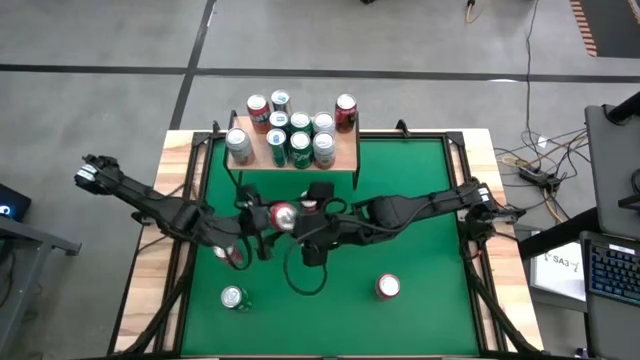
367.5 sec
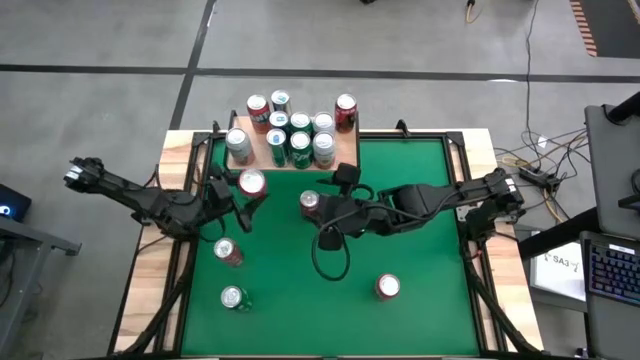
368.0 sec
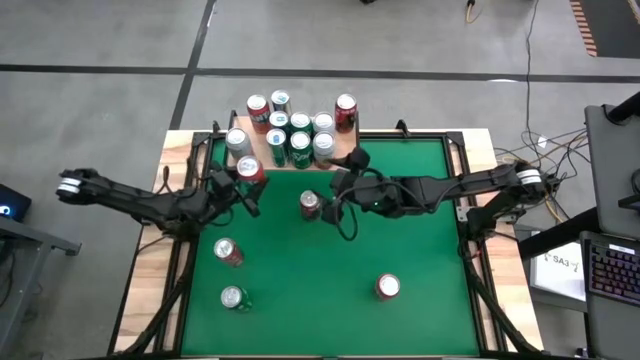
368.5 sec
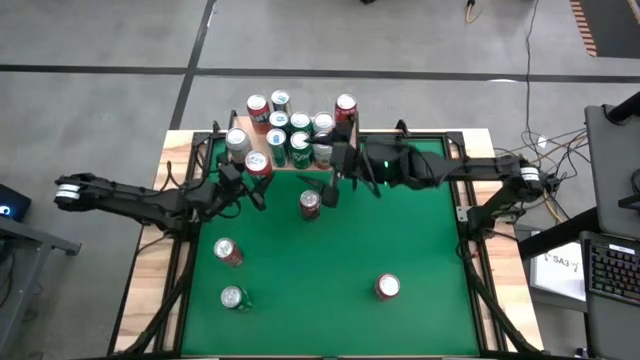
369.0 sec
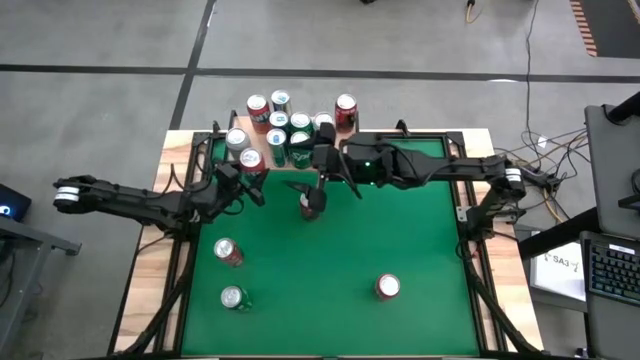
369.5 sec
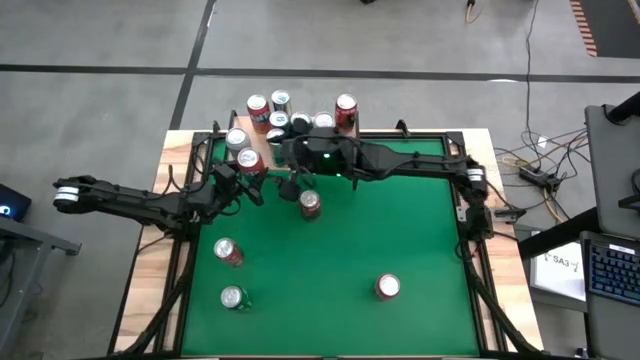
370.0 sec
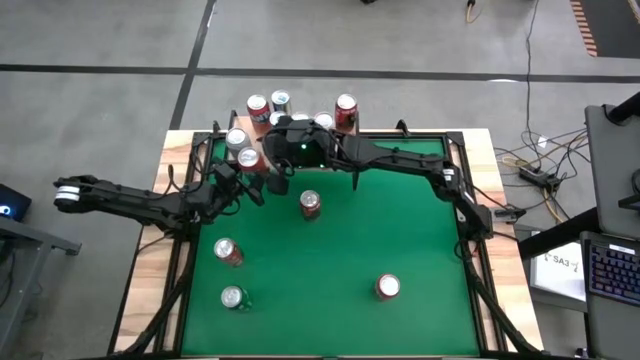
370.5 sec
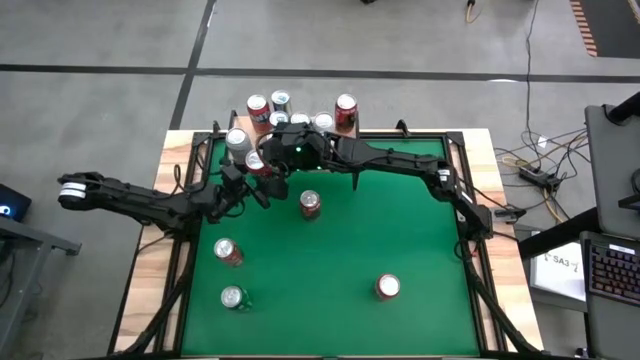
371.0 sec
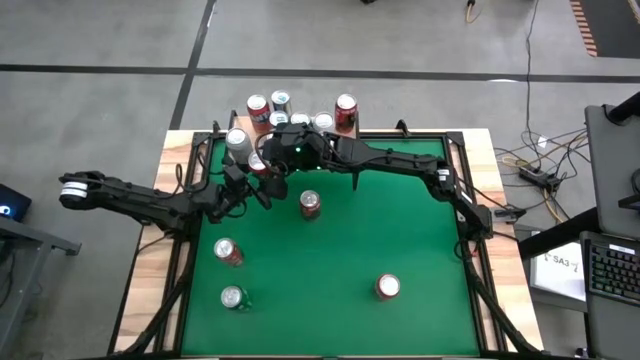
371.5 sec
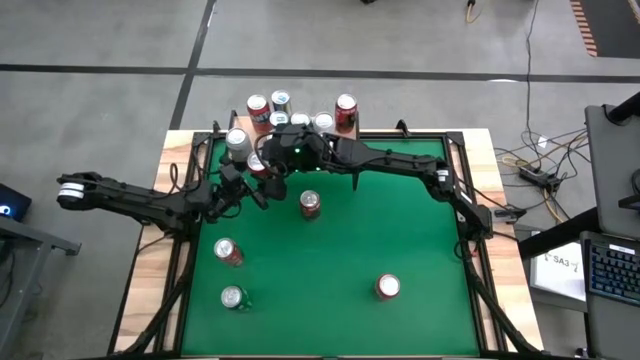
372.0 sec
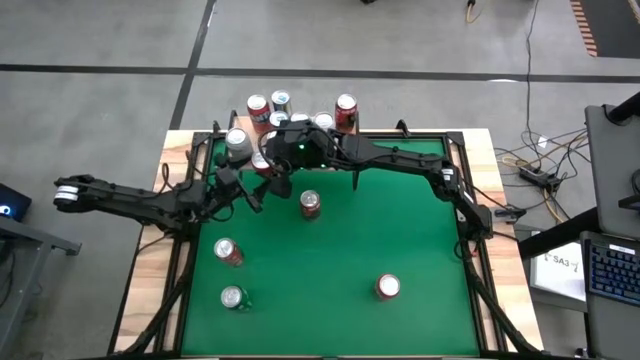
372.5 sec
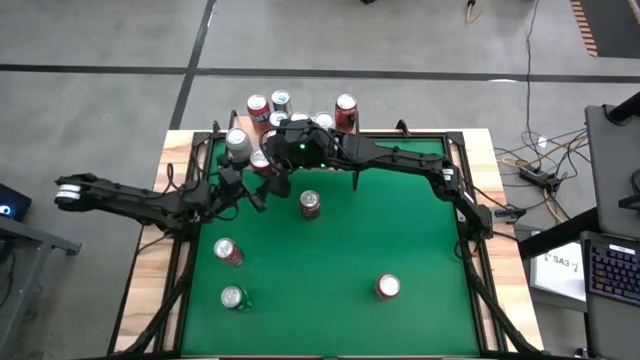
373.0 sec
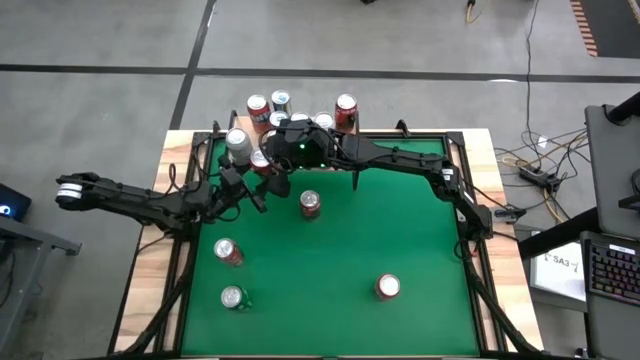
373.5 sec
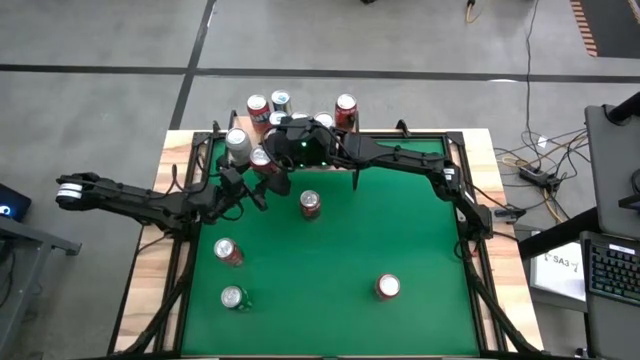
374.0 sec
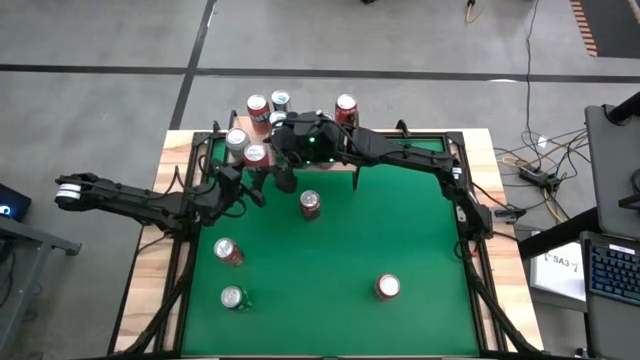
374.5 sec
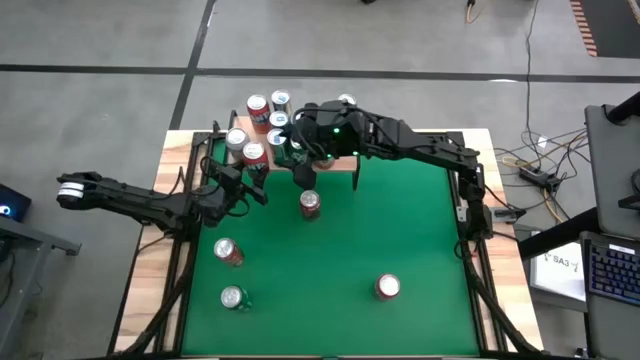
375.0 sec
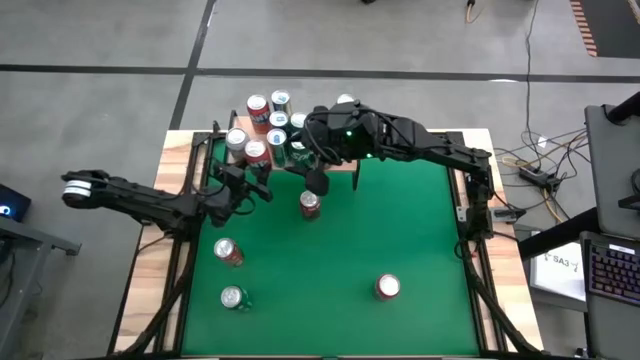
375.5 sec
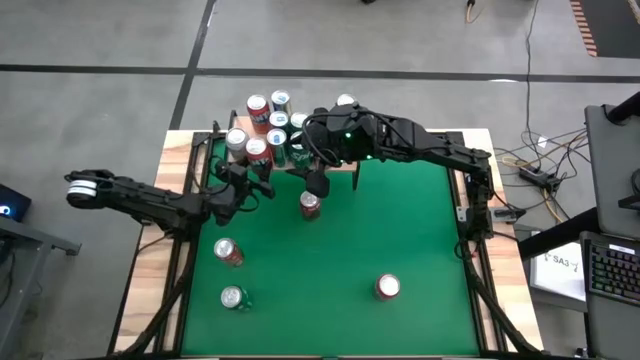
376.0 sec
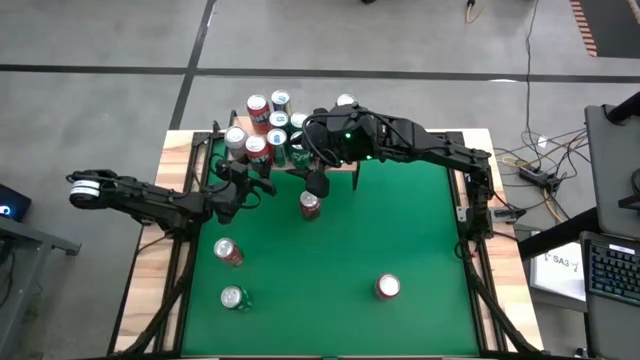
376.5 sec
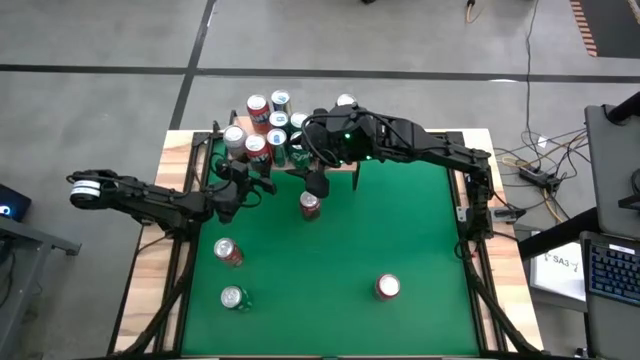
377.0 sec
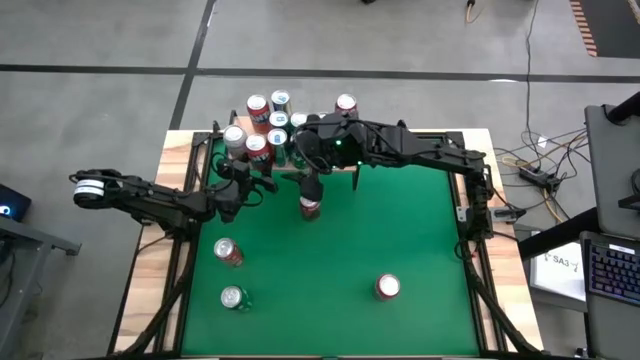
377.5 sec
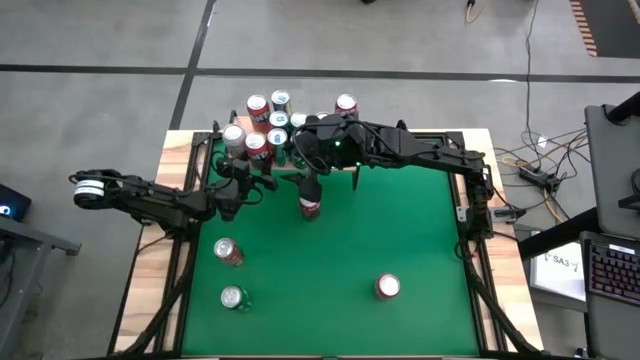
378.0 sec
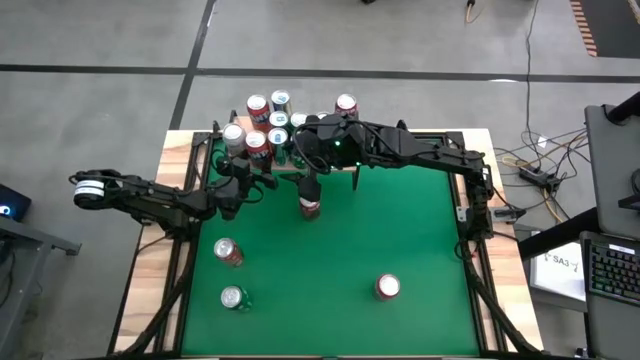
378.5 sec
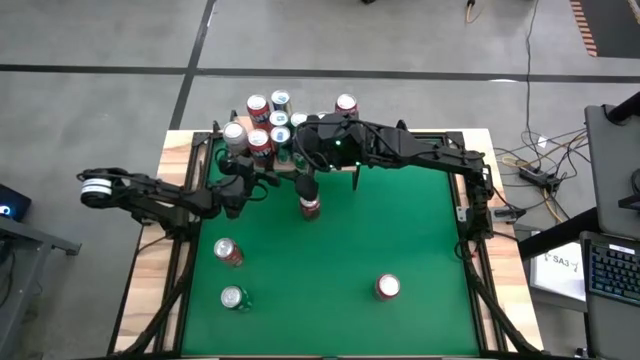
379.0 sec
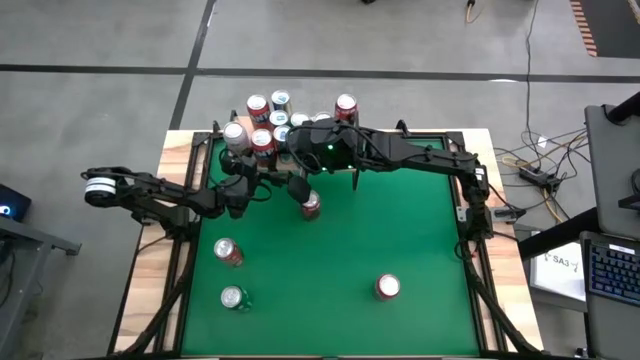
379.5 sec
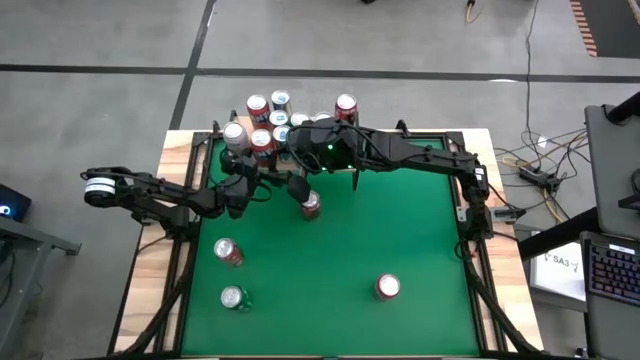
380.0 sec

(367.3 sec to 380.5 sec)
Task: Place canned beverage on shelf
Put the orange can on the shelf

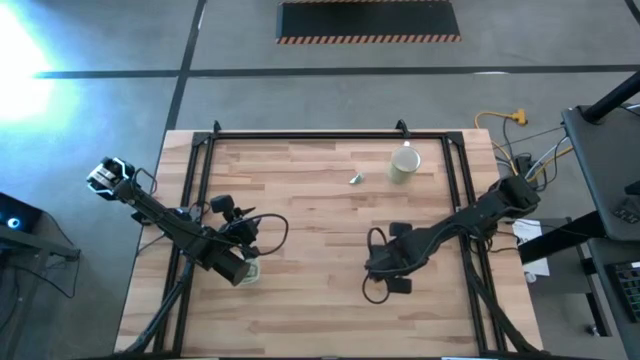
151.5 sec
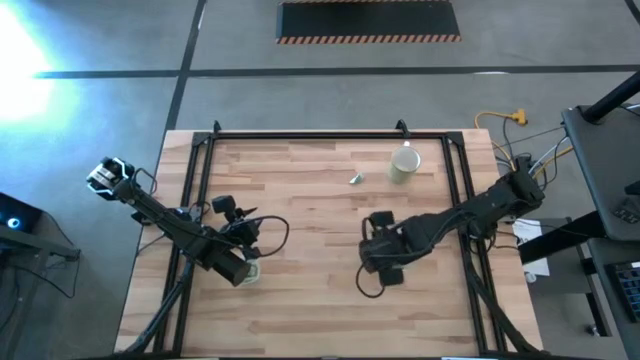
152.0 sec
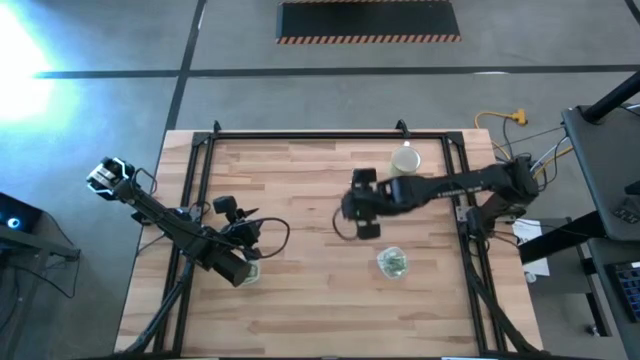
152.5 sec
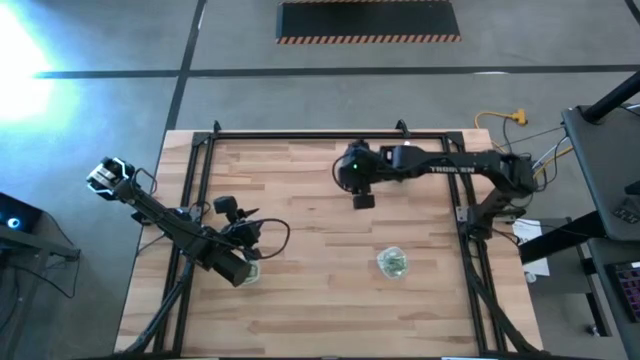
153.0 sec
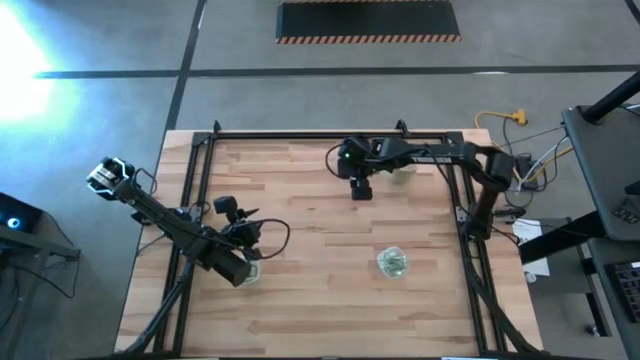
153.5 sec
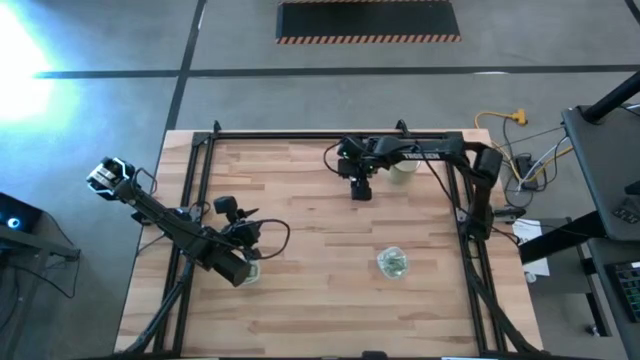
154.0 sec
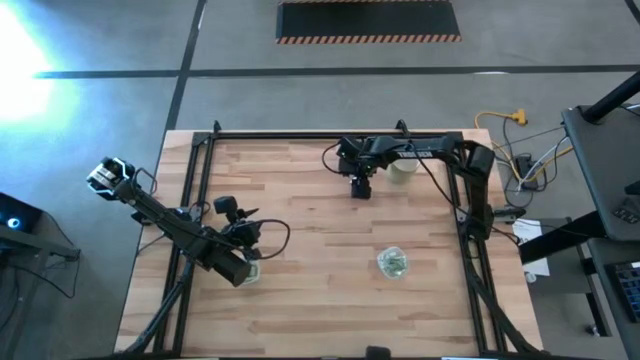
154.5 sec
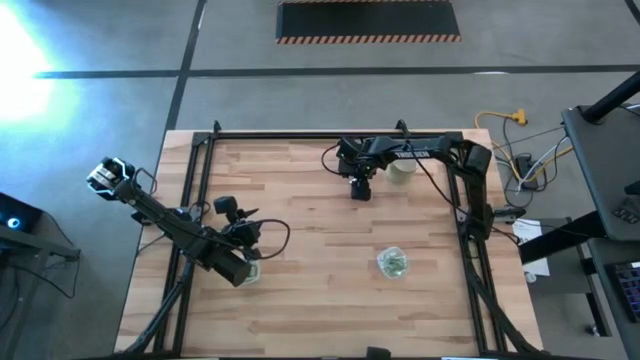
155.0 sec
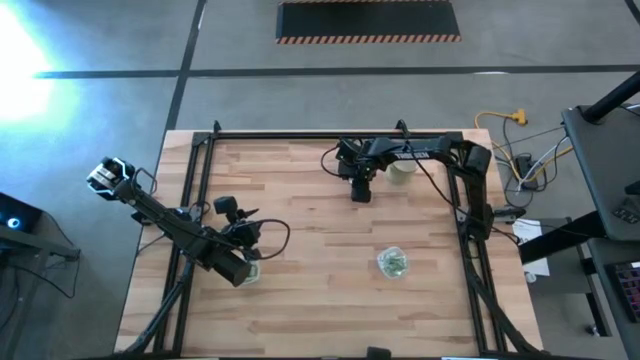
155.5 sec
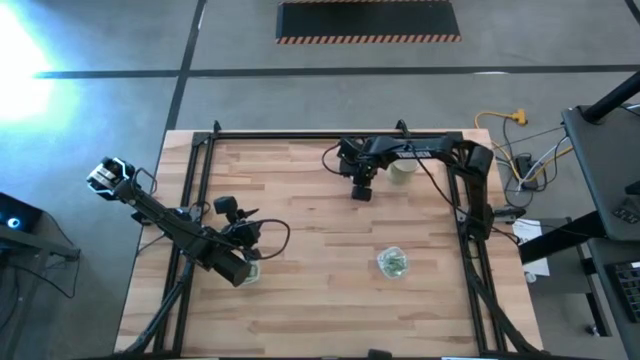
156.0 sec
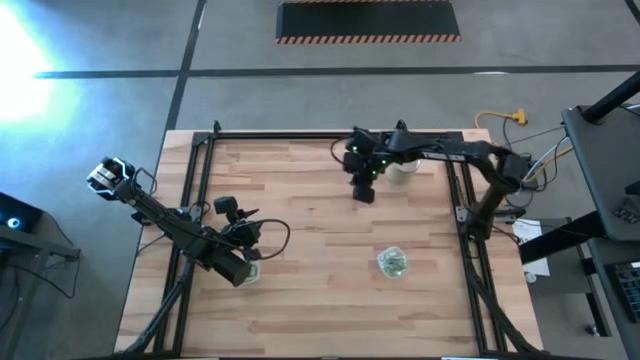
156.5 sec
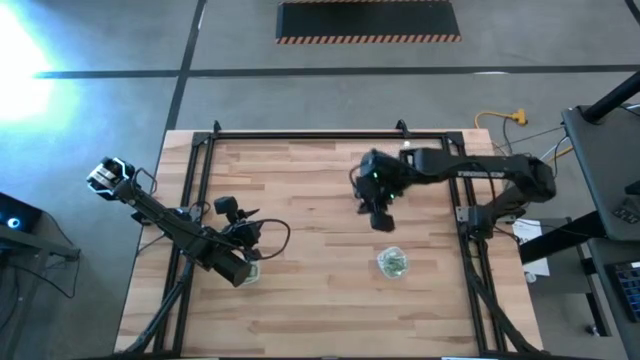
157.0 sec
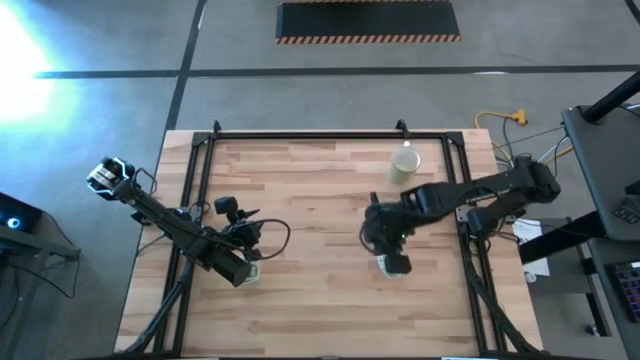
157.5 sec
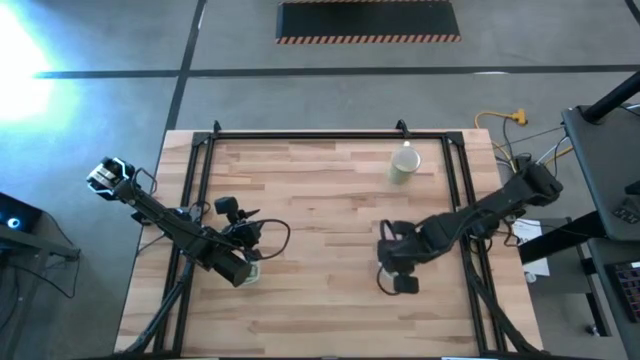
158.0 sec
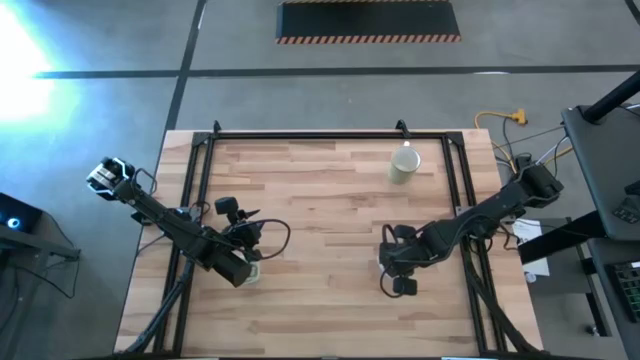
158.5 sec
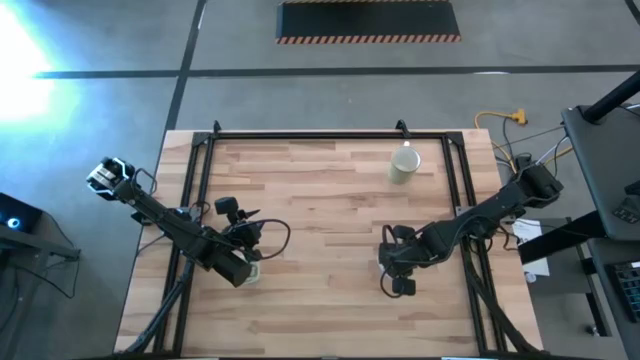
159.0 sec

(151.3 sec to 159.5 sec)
Task: Pick and place Stevia / Truvia into bins
Put the stevia packet into the right transparent container
